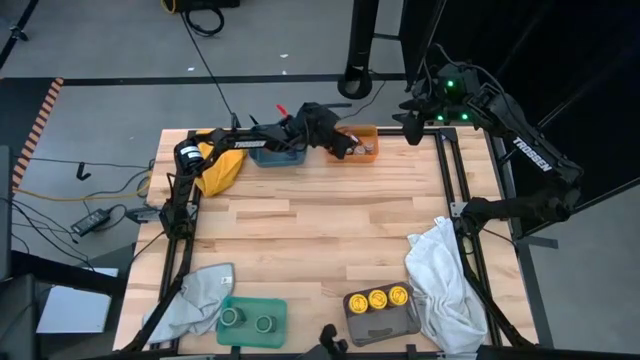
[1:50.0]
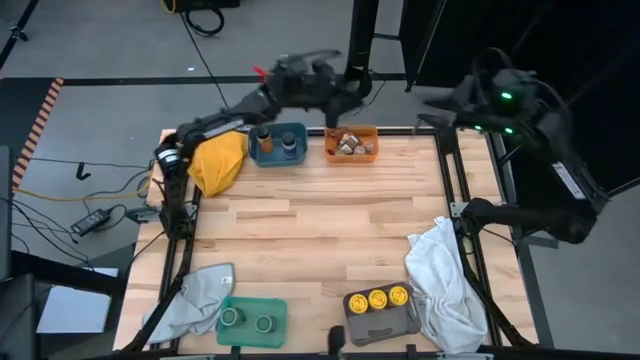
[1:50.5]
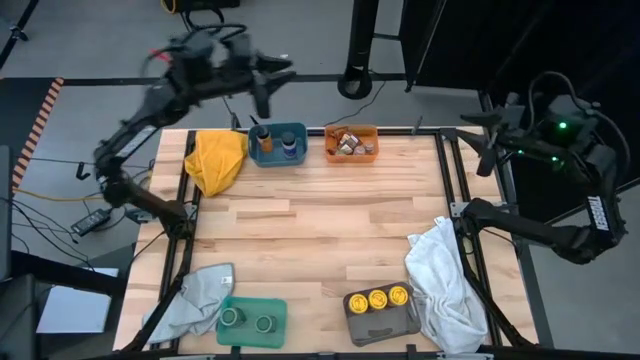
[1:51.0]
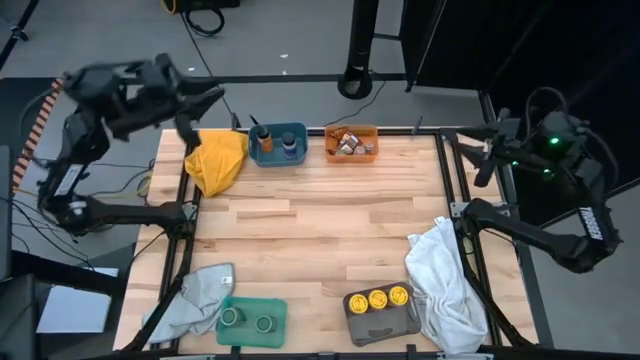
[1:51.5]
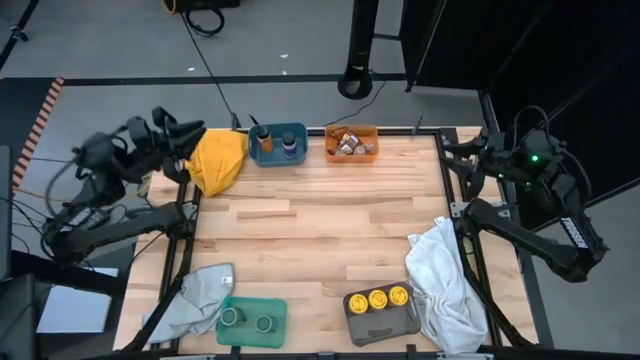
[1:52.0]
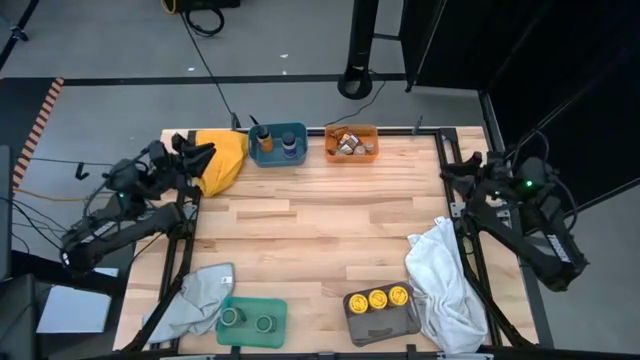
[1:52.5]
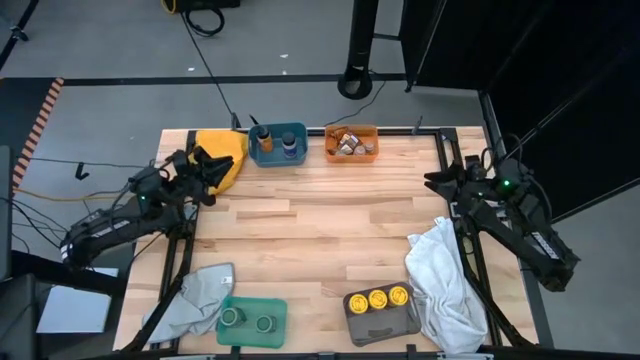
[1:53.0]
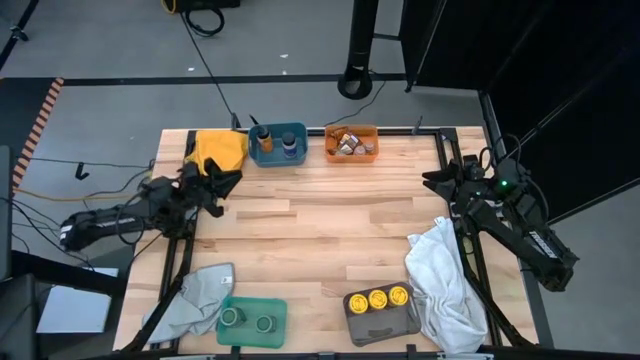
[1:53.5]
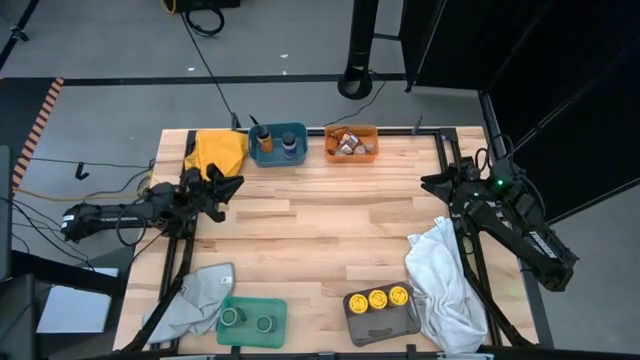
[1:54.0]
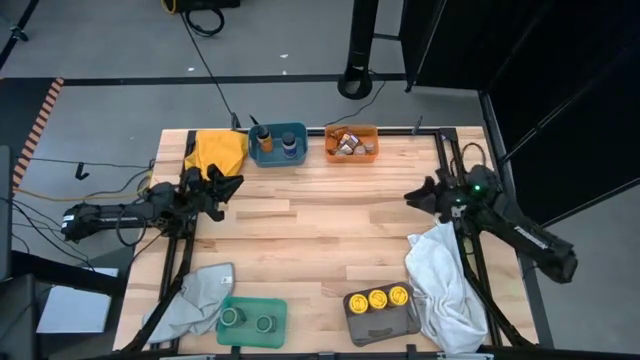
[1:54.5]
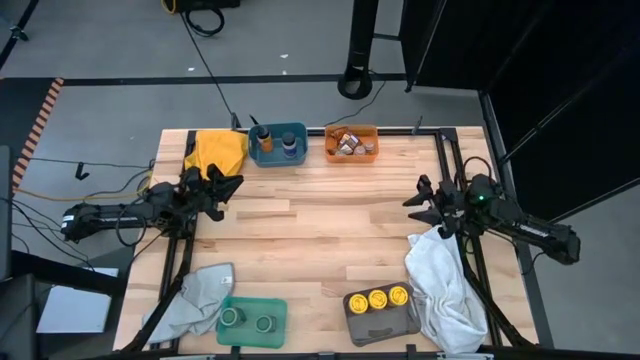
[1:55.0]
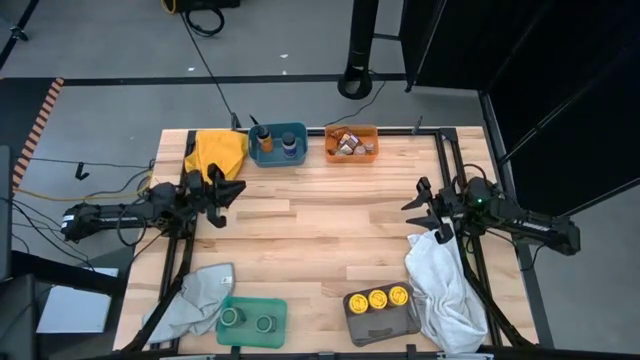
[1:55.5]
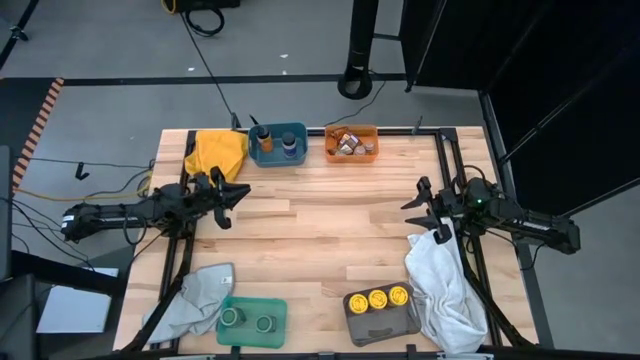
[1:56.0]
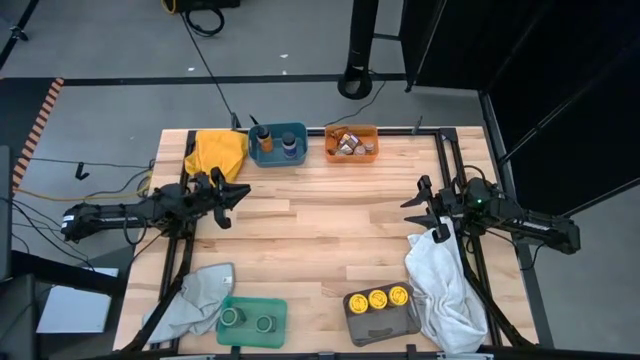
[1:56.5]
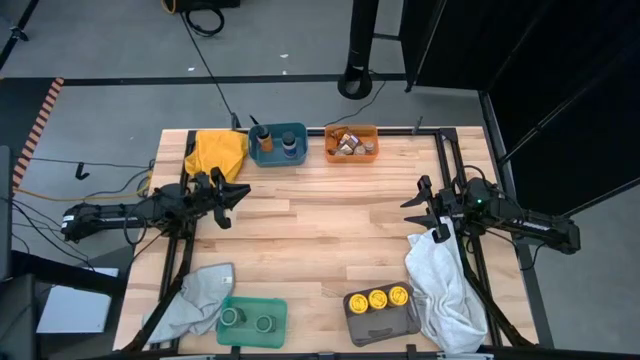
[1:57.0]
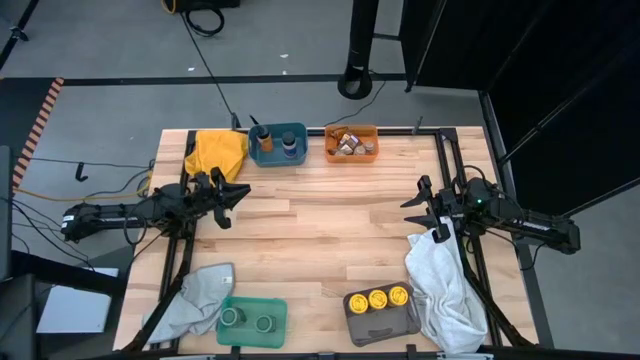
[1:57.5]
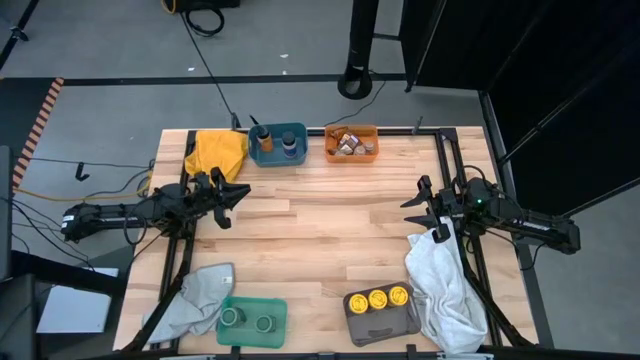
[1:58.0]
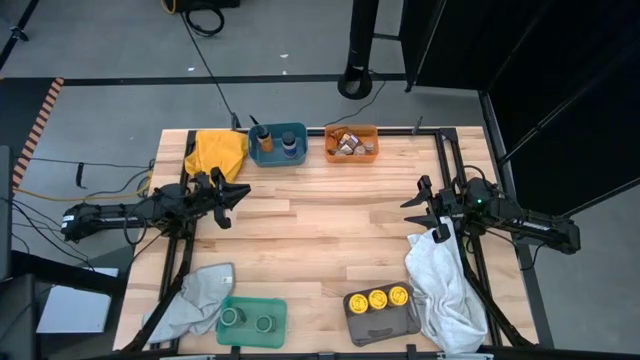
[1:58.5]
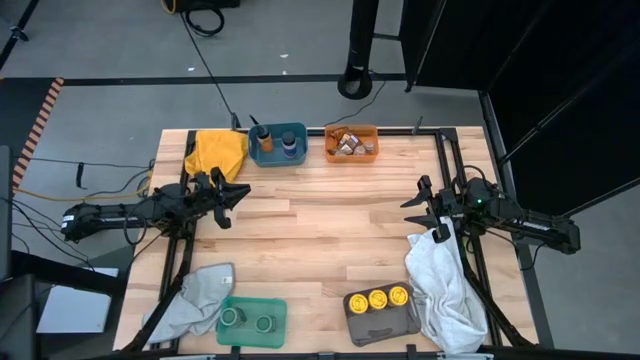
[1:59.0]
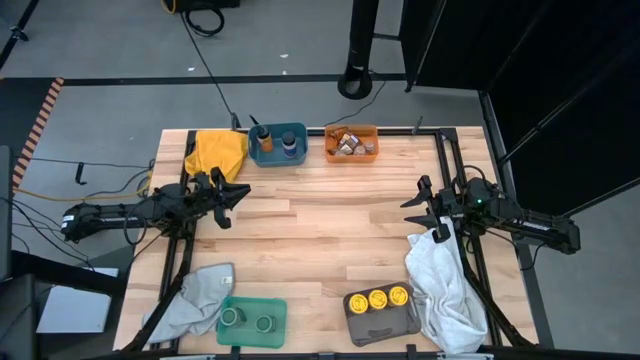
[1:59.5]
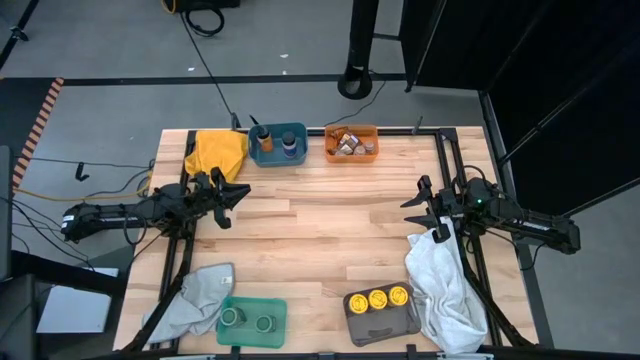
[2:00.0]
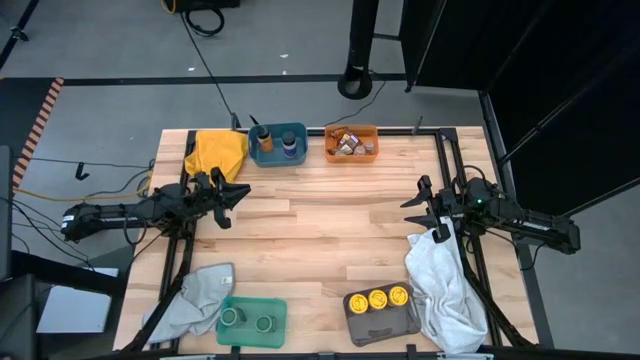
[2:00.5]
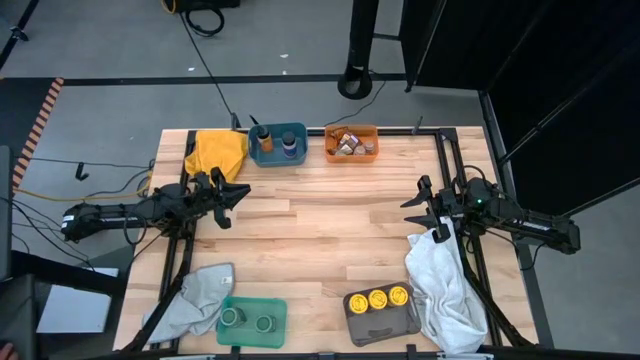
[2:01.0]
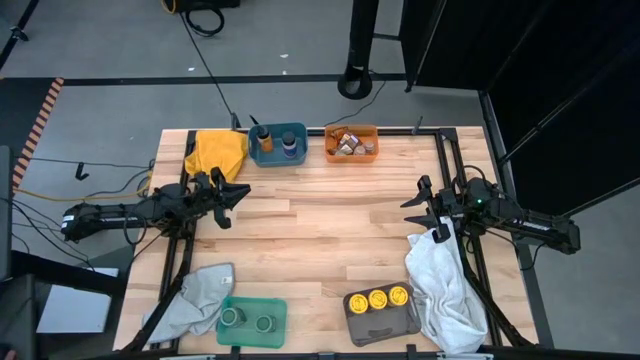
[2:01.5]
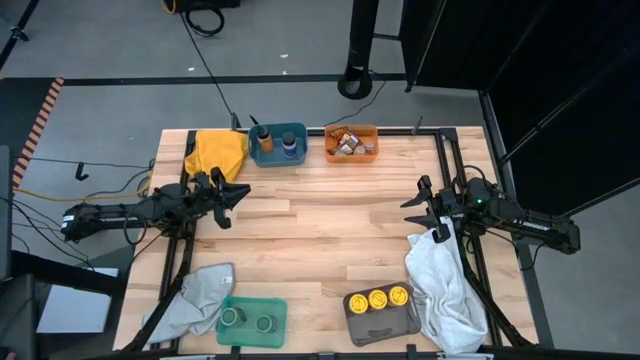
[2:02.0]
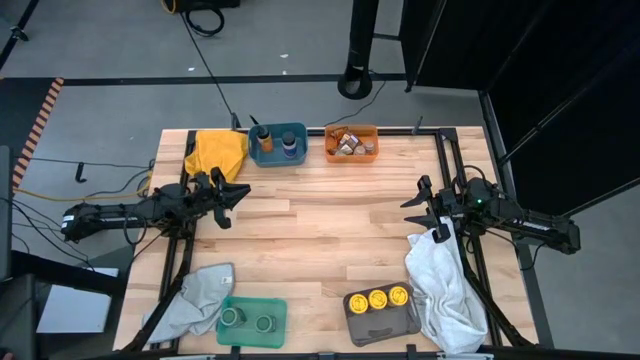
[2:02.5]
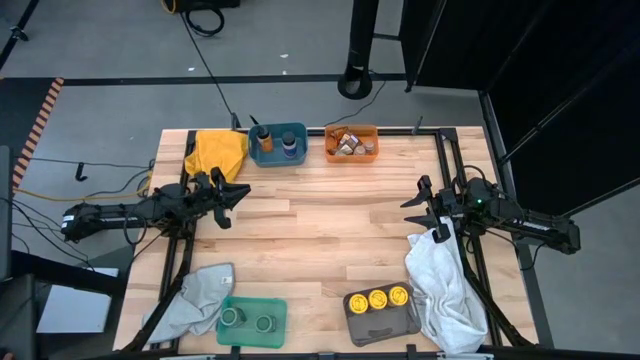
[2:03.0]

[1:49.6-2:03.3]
Task: Sort spices by type
Return to Home Position

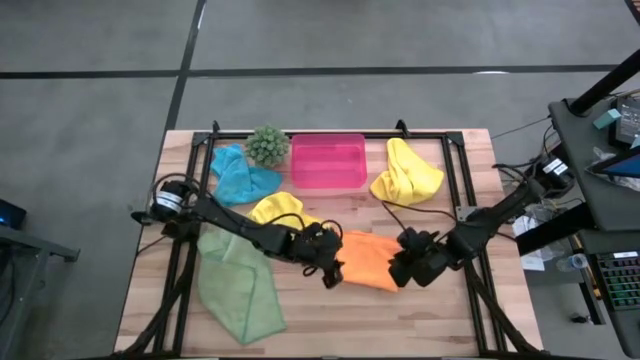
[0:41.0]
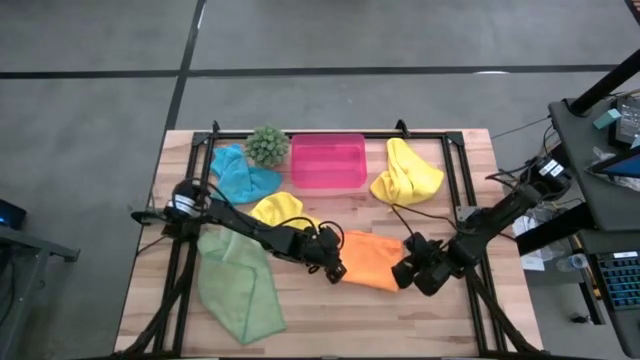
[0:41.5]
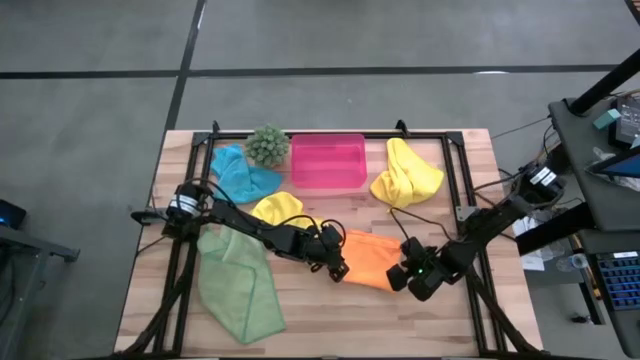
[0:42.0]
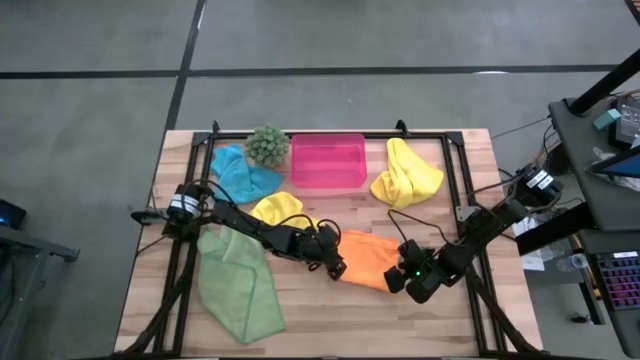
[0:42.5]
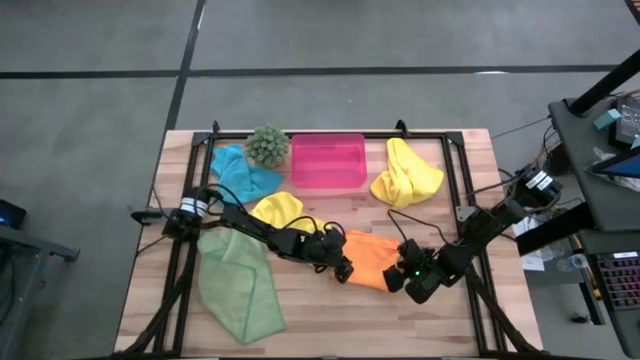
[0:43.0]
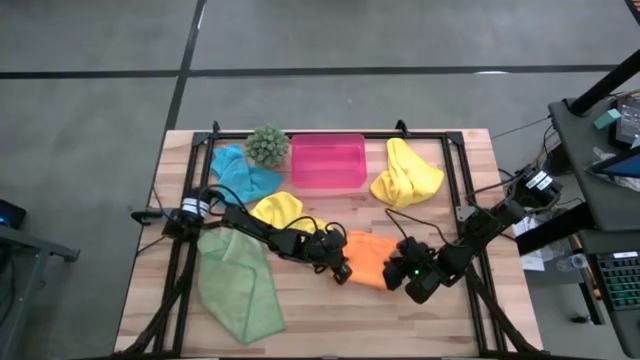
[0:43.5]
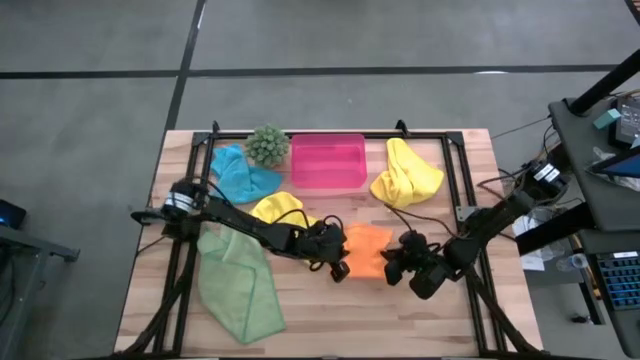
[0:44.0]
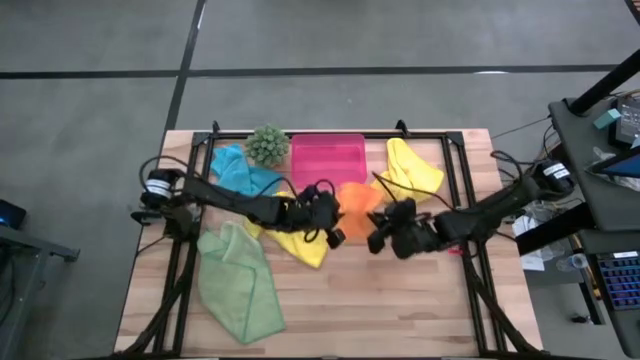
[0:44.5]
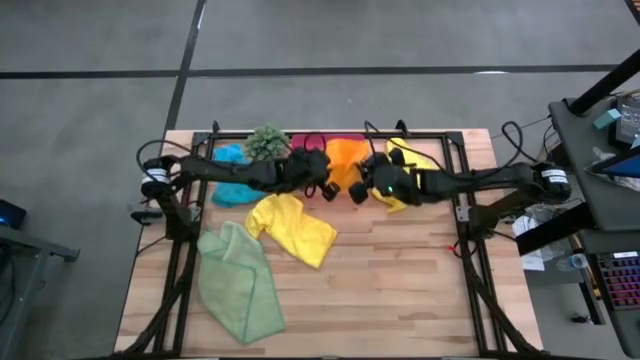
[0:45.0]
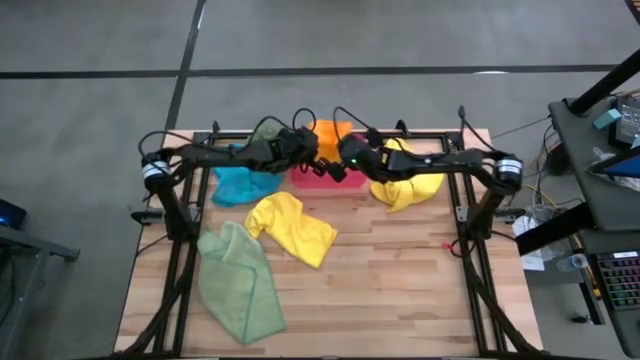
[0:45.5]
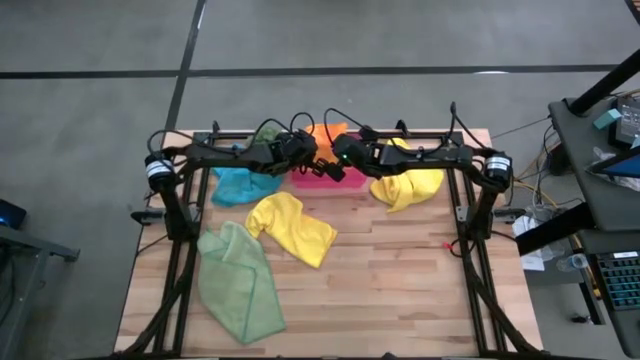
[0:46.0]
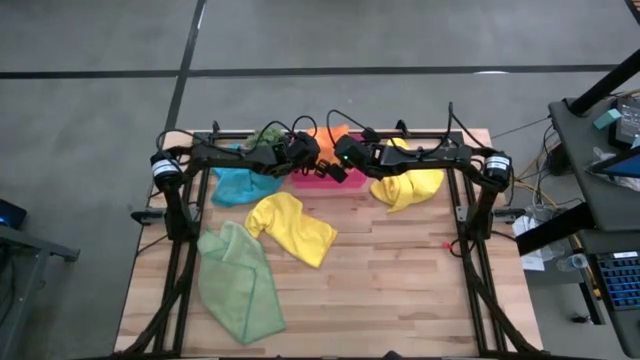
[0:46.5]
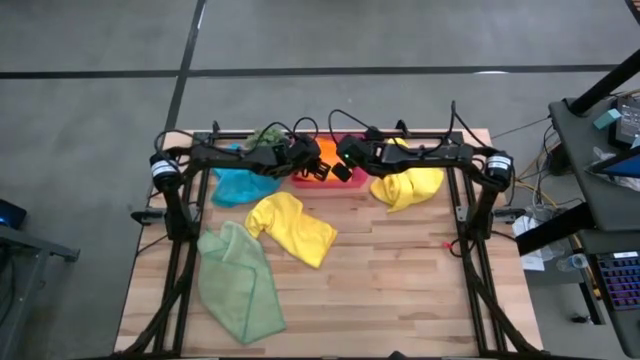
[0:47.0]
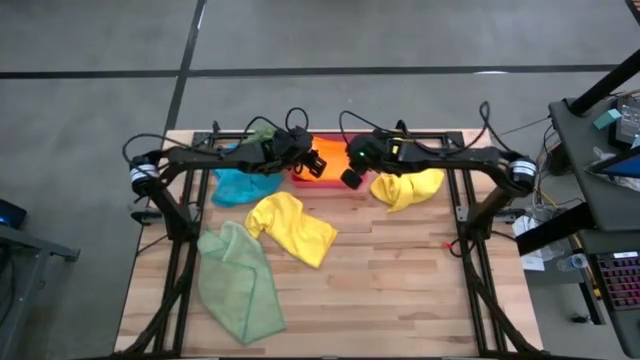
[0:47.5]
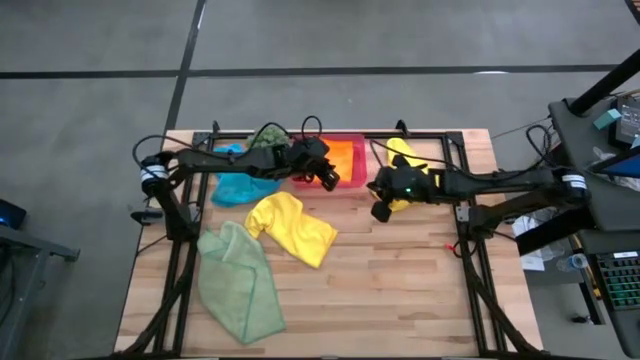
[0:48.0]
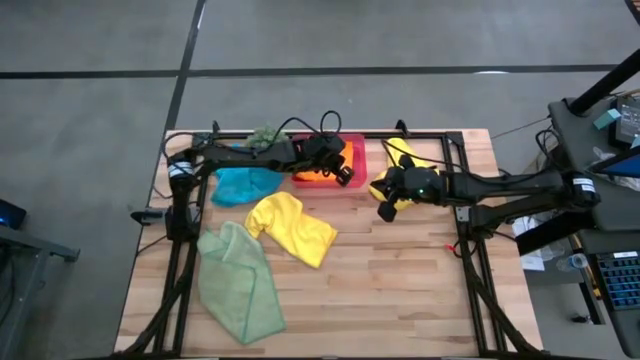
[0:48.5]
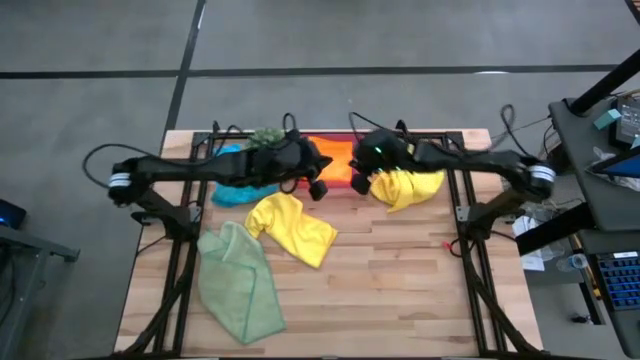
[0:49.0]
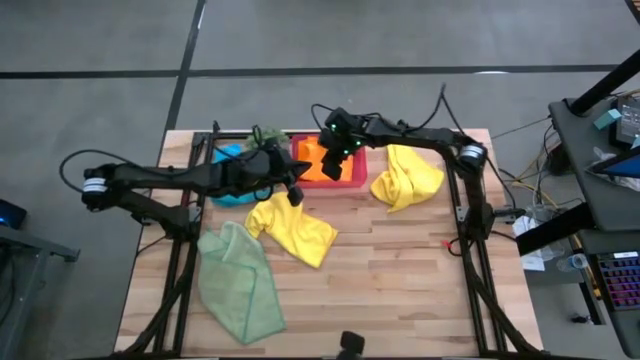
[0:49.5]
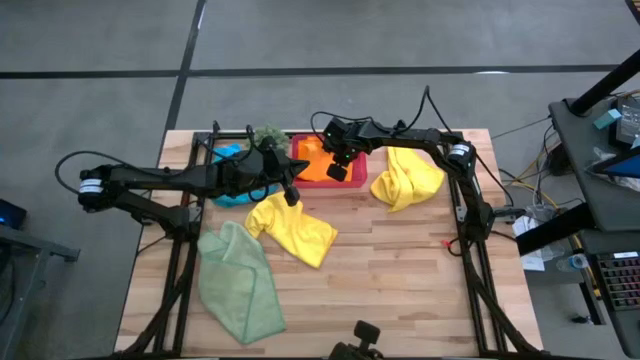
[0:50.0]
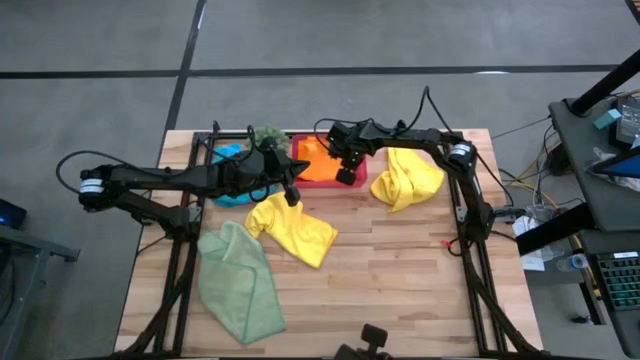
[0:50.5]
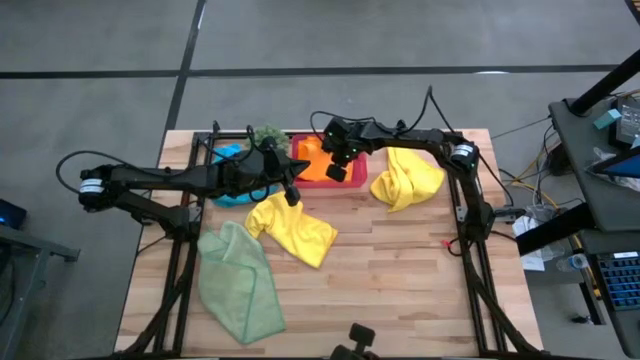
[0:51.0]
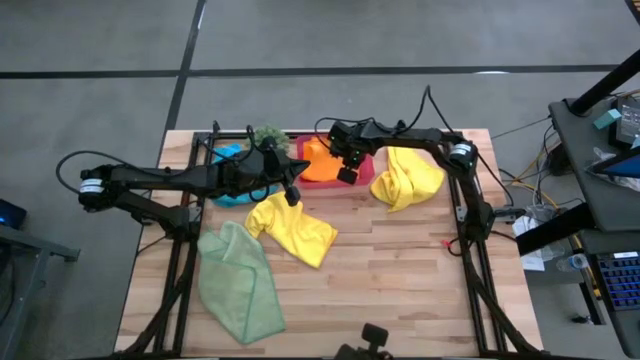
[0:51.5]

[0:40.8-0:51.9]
Task: Fold microfiber towels
Put the folded orange microfiber towel into the red bin
